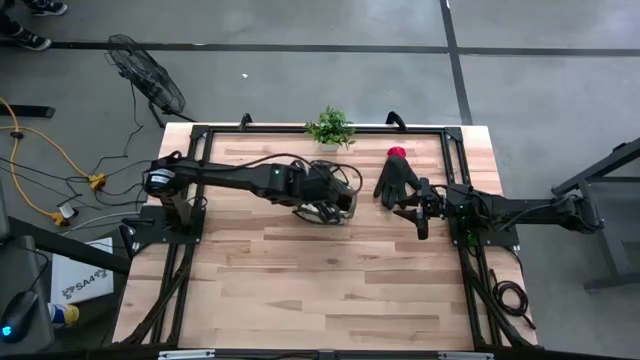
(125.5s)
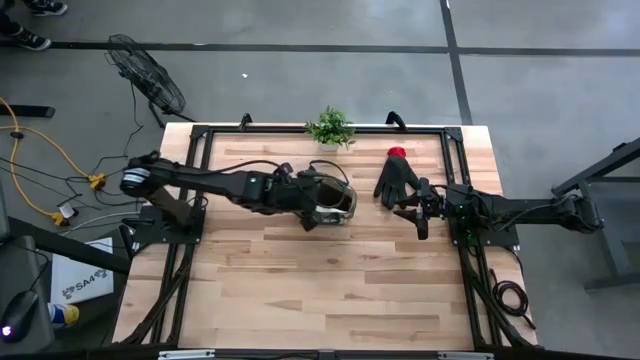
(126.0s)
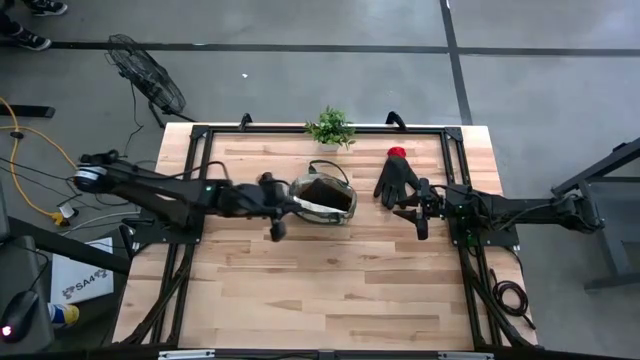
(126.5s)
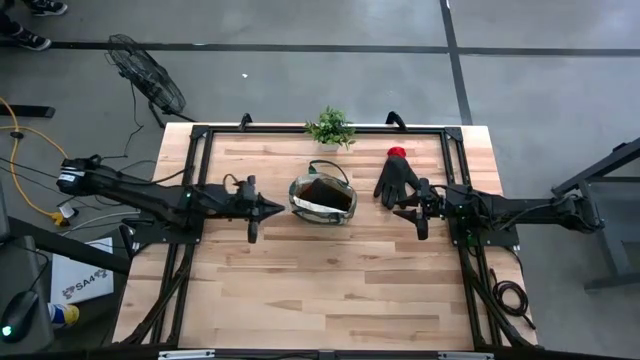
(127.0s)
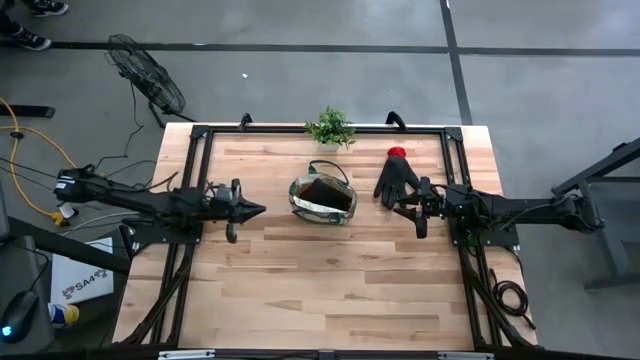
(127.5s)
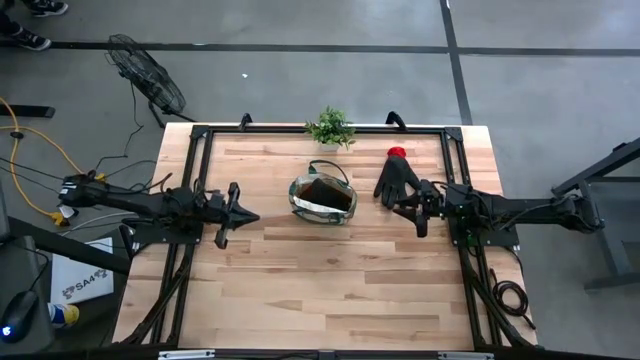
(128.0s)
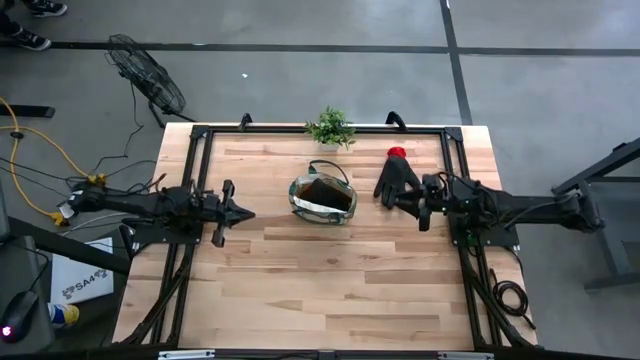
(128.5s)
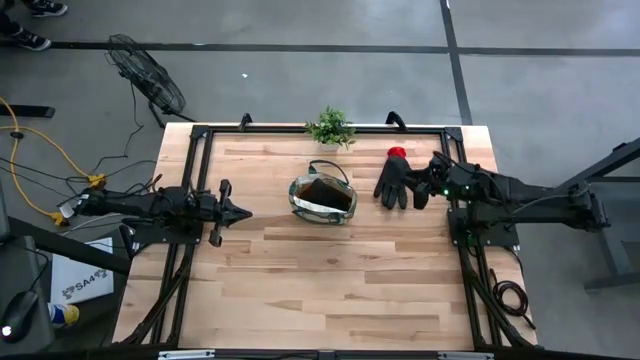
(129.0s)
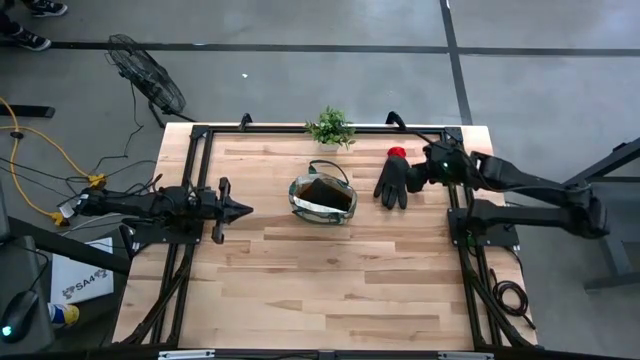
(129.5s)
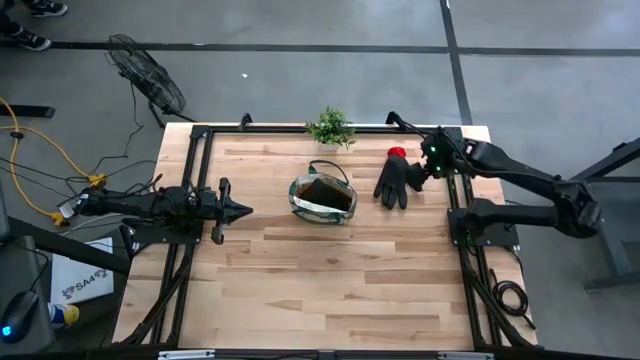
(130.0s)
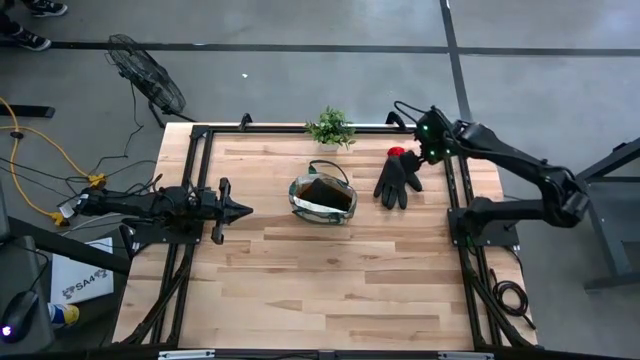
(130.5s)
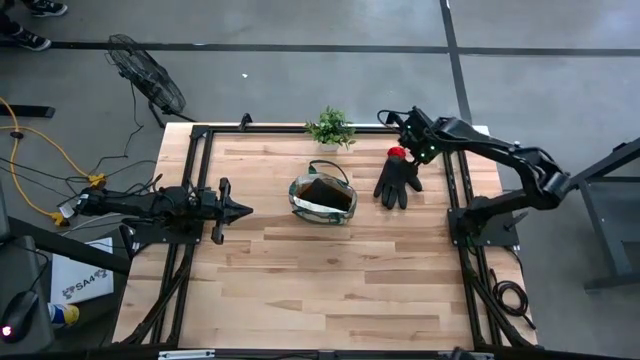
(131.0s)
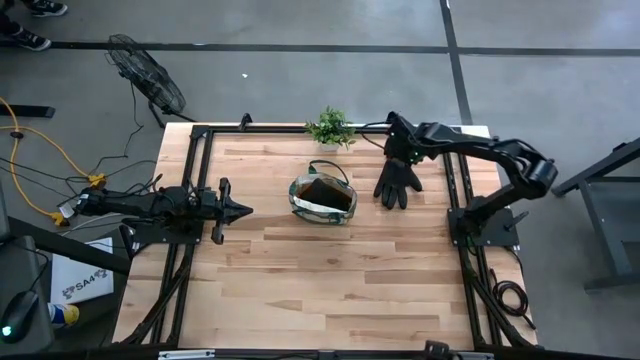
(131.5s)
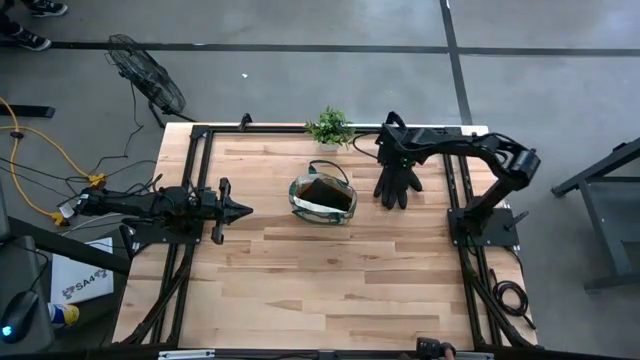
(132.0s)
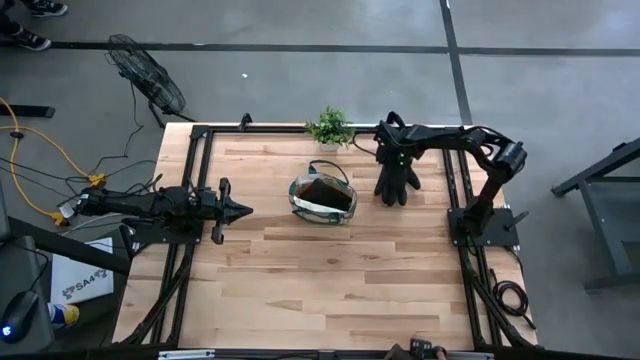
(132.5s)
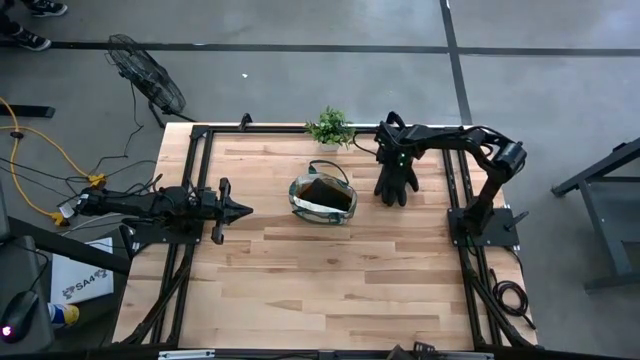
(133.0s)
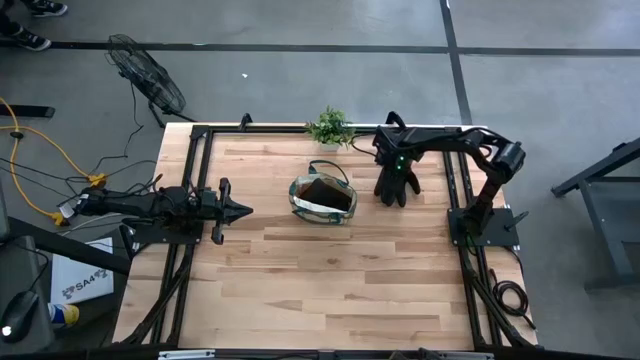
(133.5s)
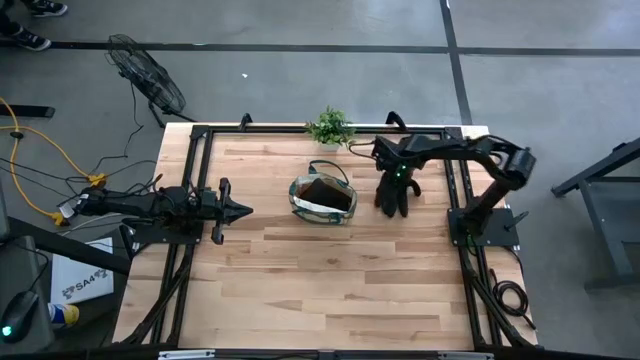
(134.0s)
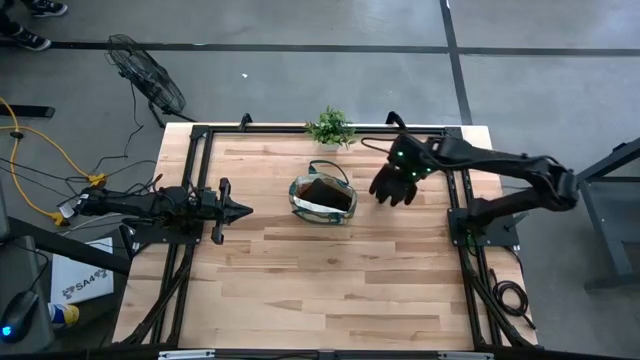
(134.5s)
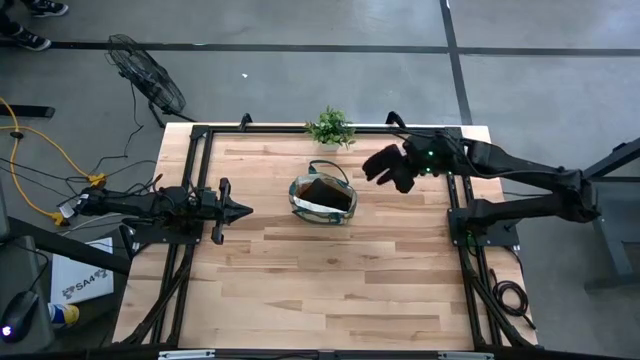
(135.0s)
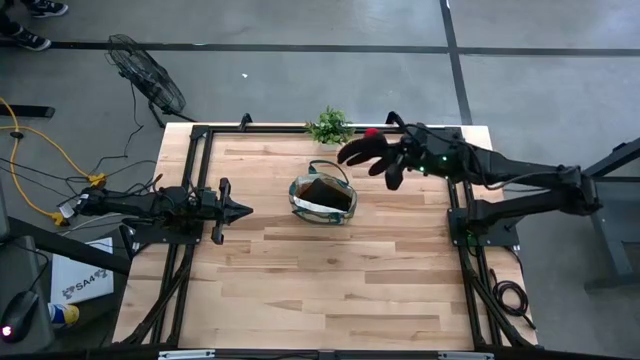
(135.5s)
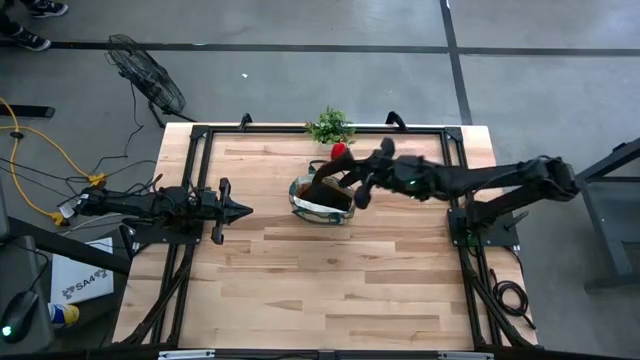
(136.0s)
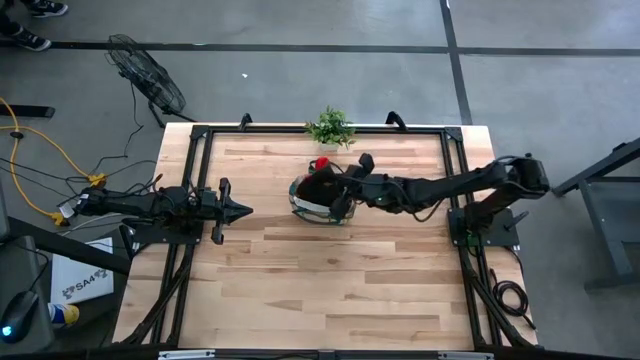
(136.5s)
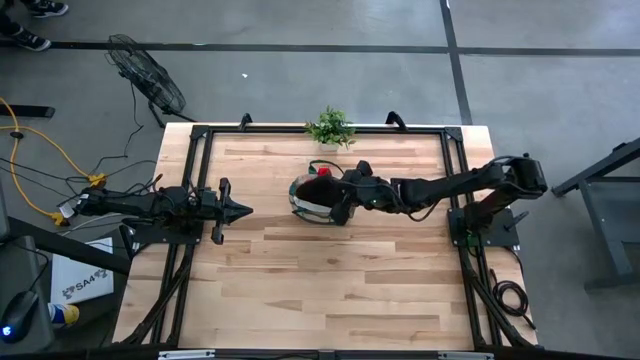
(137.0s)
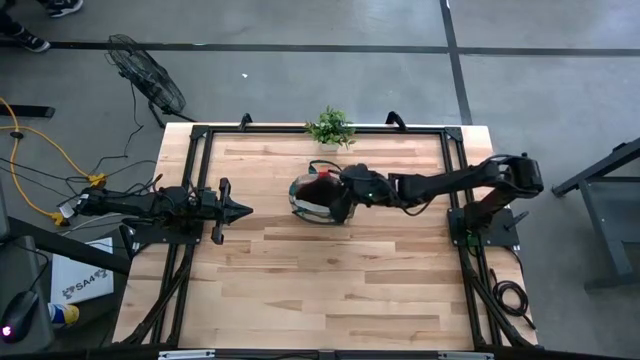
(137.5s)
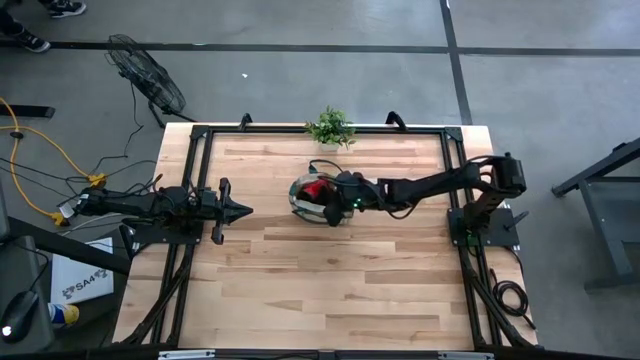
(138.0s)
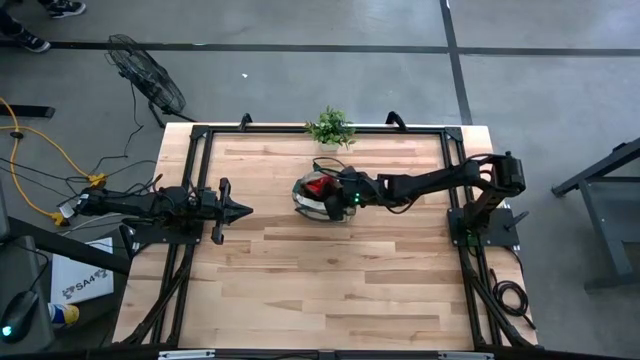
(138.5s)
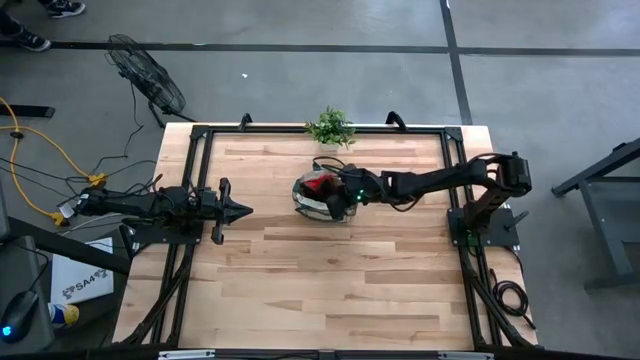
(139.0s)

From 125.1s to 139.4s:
Task: Pick & Place Garden tools in Gardening bag
Put the red glove into the gardening bag

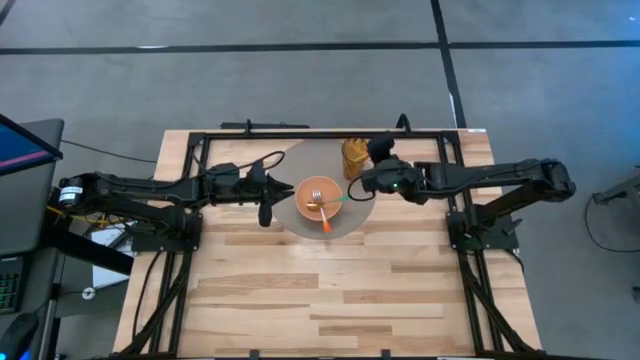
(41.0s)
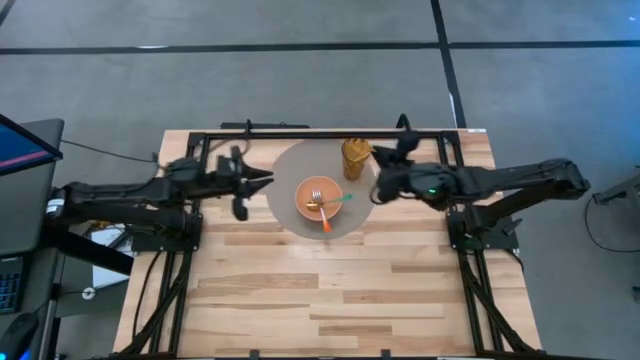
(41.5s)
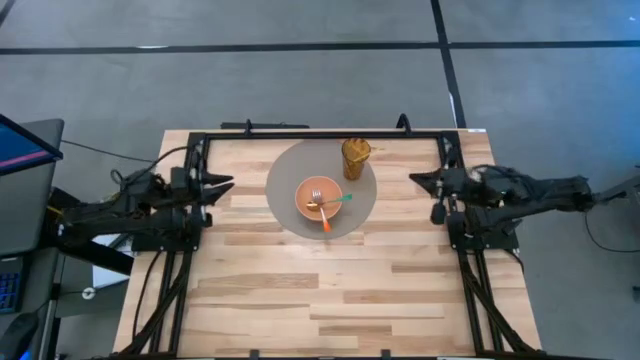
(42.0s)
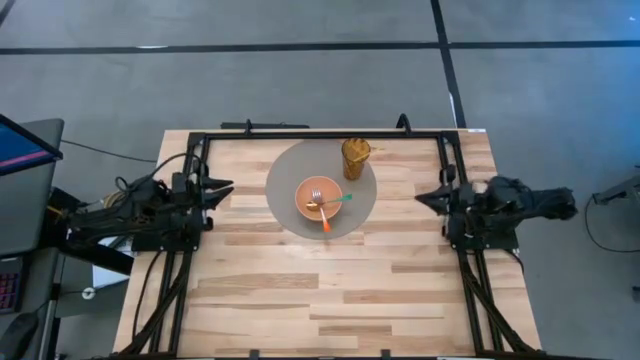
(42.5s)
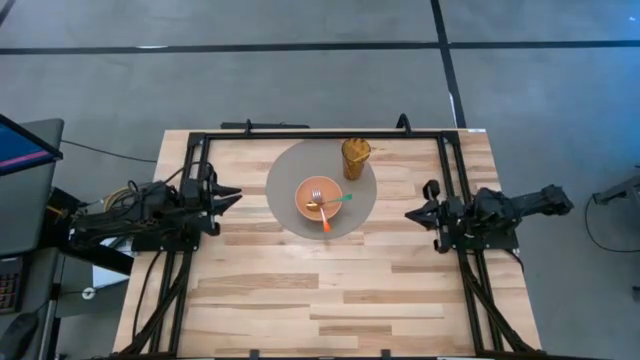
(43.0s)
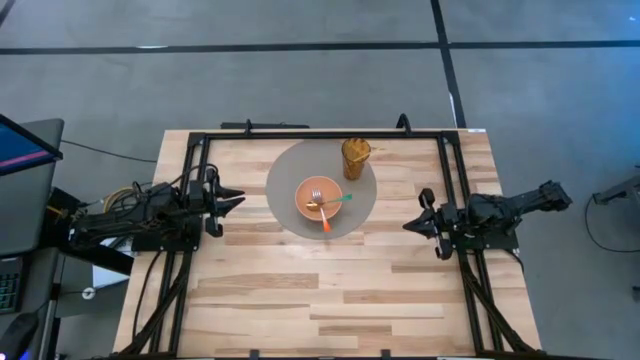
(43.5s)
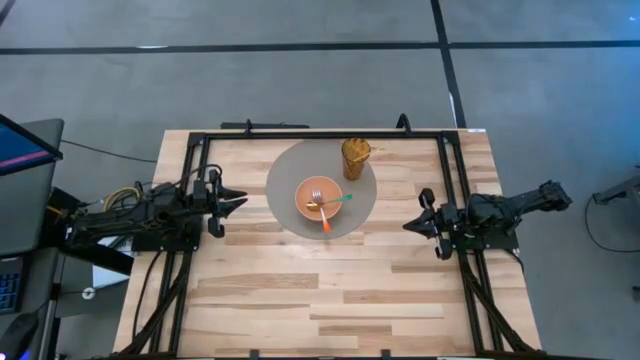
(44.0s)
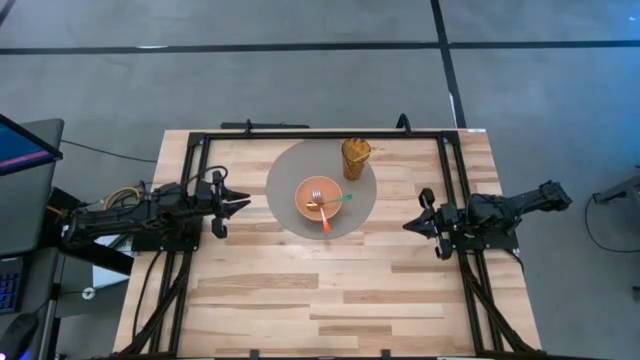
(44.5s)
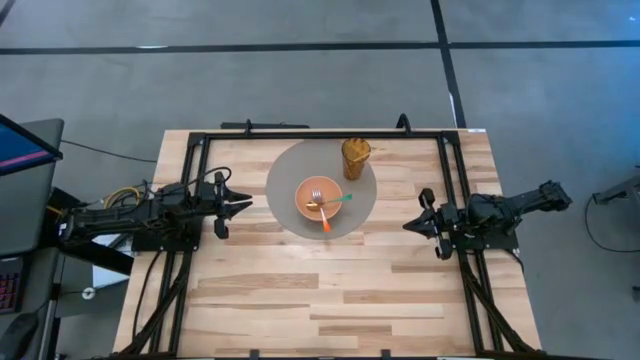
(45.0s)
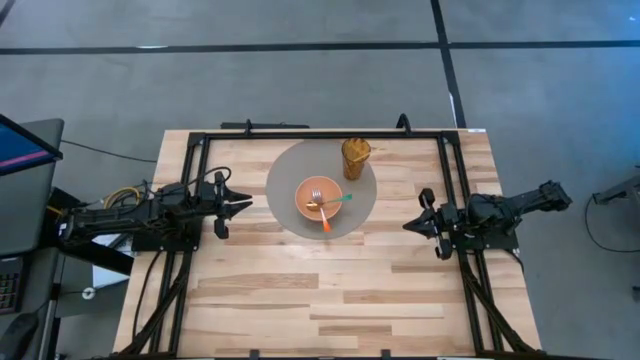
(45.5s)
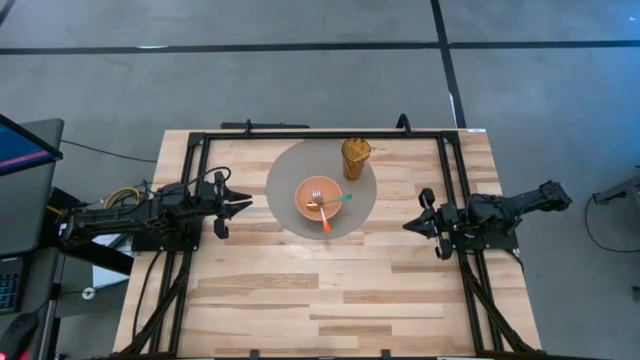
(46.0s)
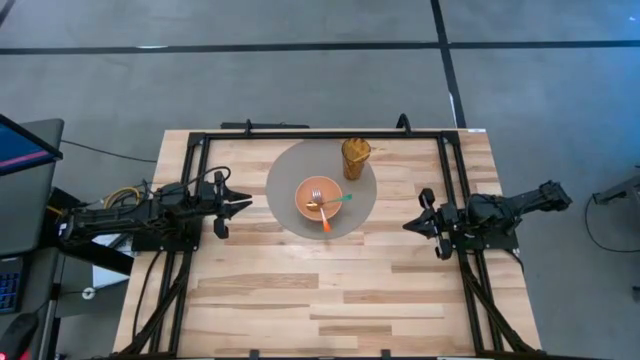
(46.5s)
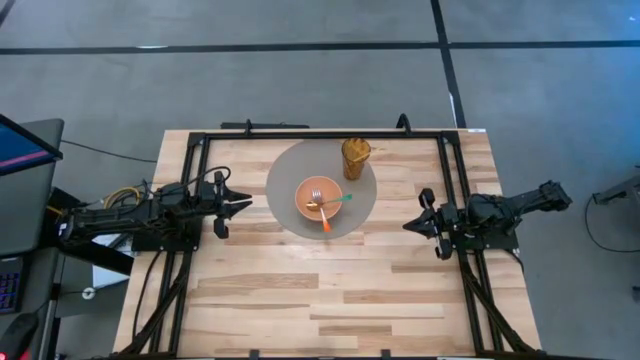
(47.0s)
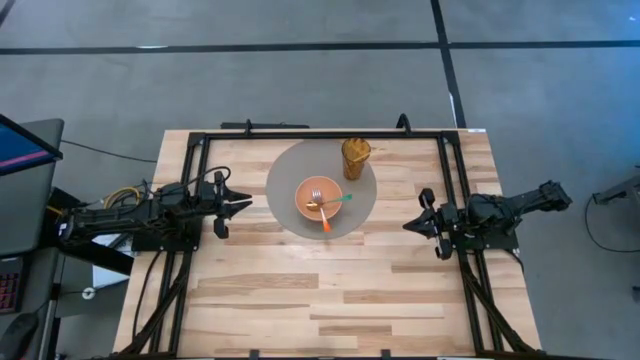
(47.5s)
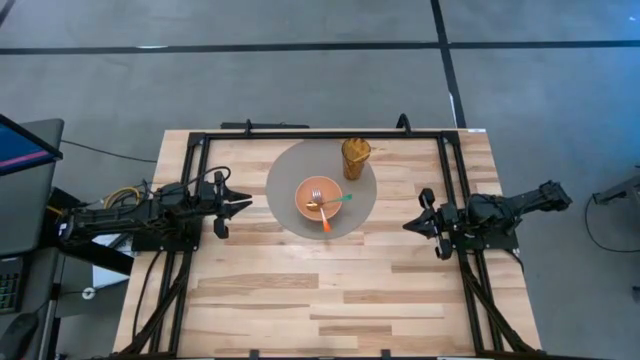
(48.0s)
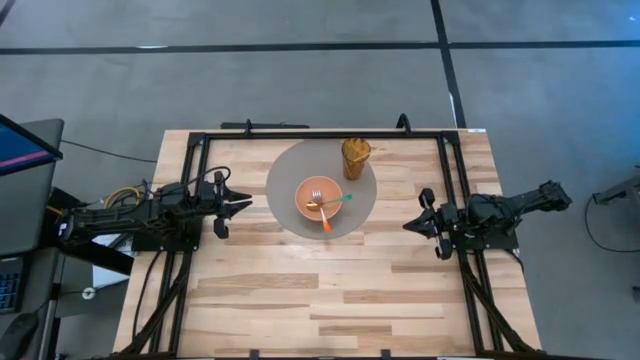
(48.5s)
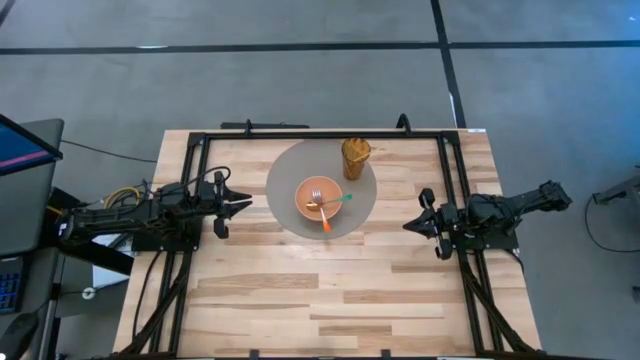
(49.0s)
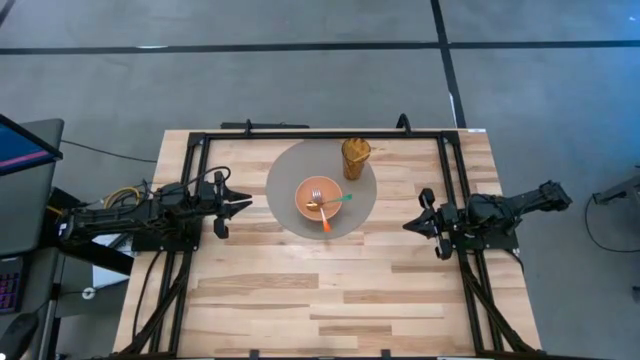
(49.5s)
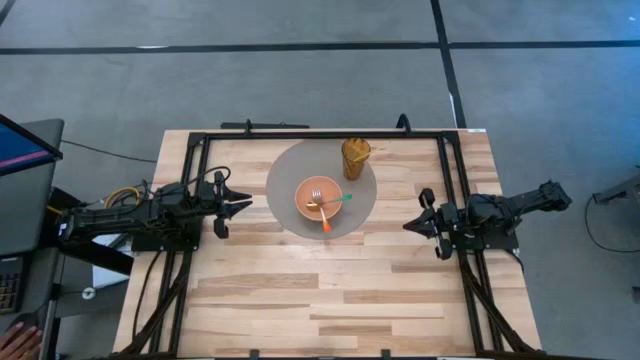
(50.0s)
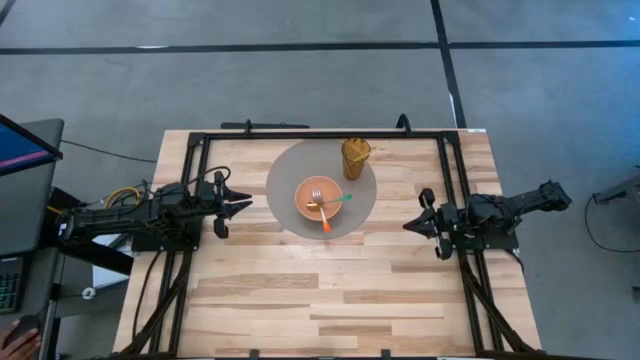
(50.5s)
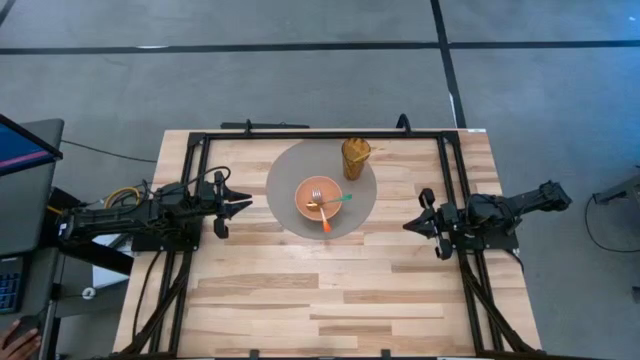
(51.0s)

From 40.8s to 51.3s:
Task: Pick & Place Utensil
Return to Home Position
